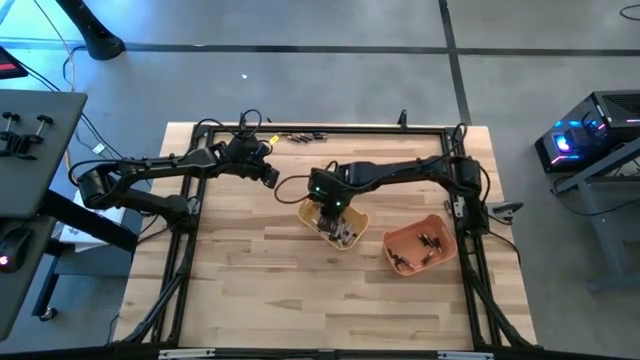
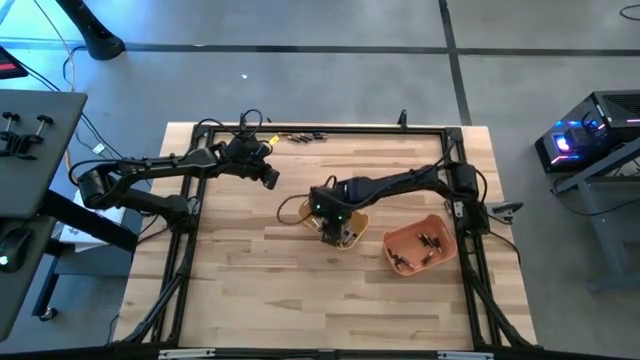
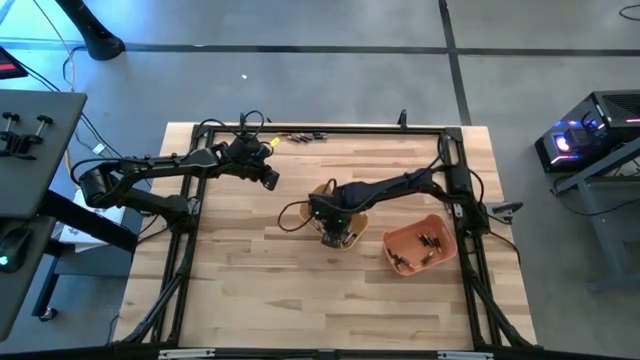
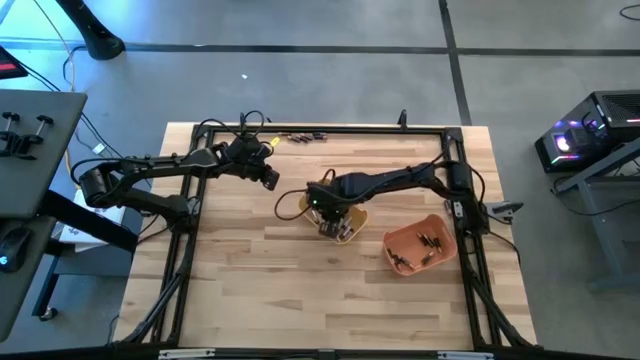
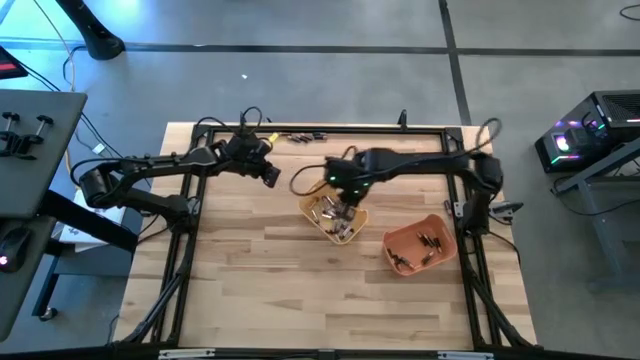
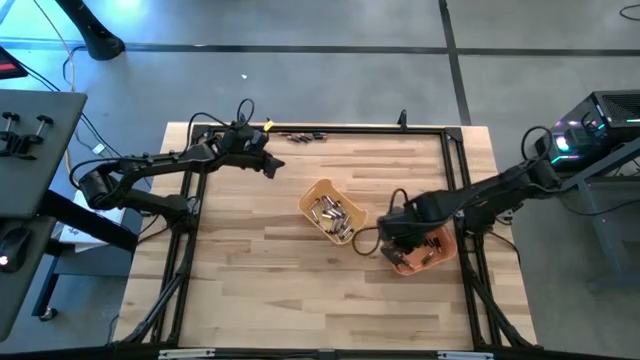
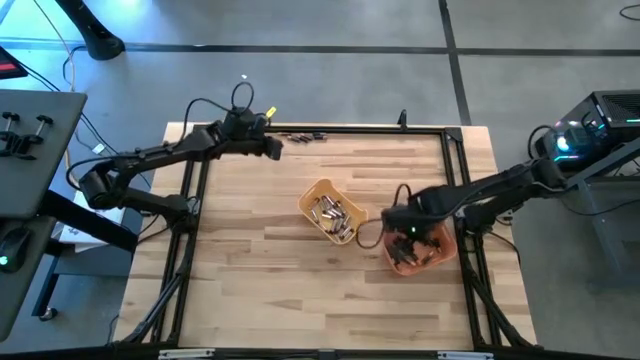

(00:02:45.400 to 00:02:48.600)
Task: Sort batteries
Move the black battery at the yellow bin to the orange bin

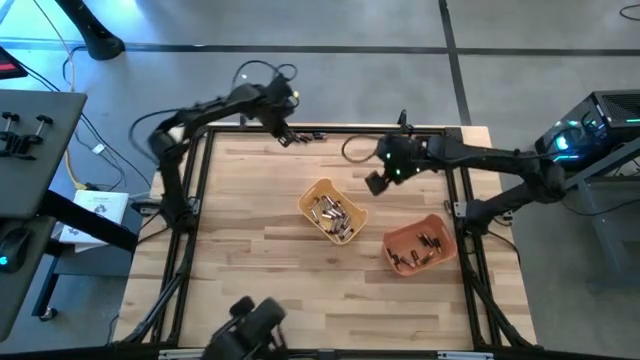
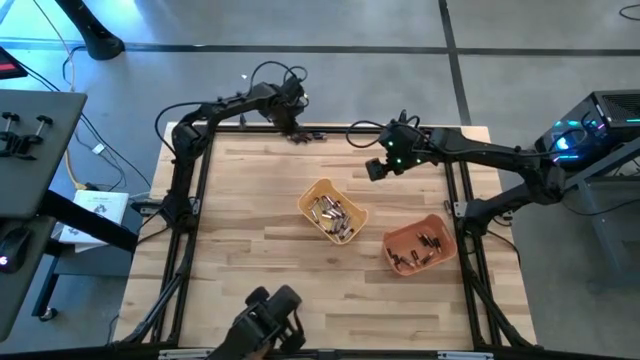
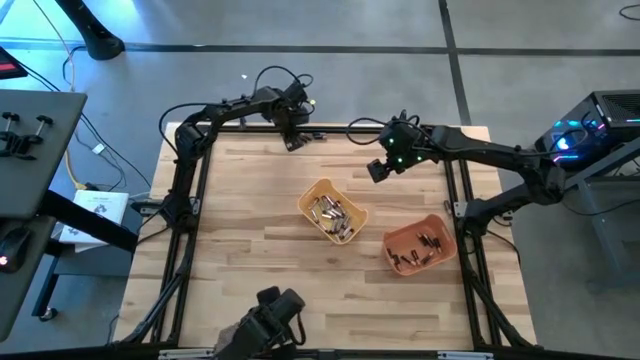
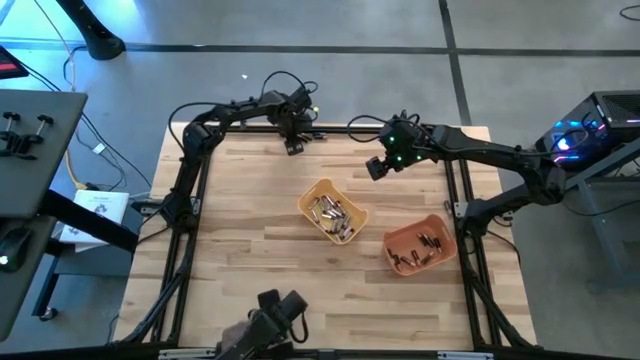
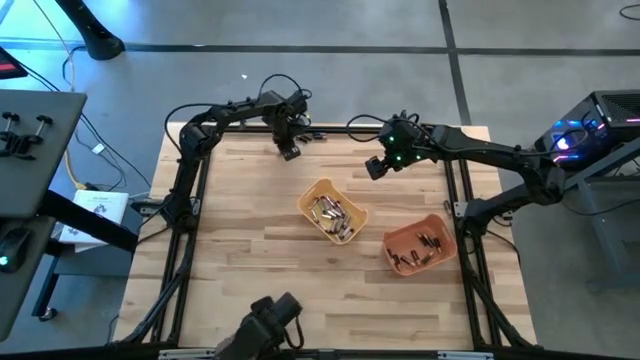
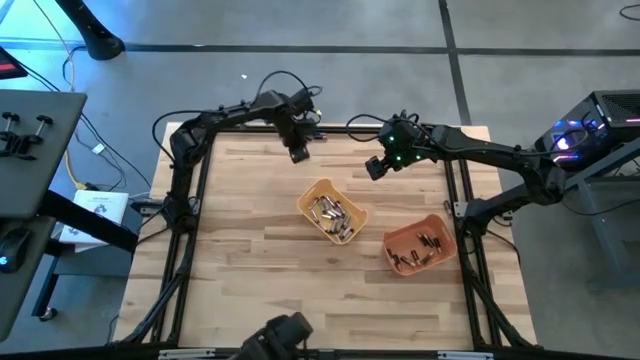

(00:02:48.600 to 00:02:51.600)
Put the black battery into the orange bin

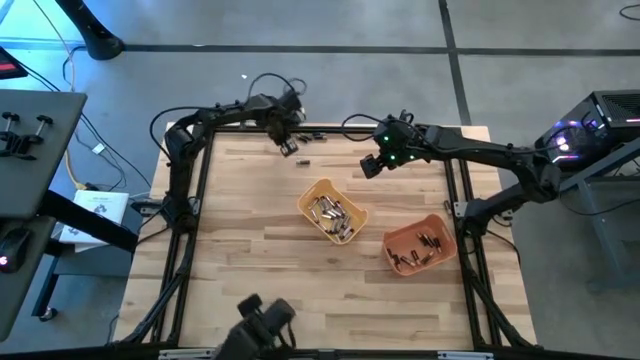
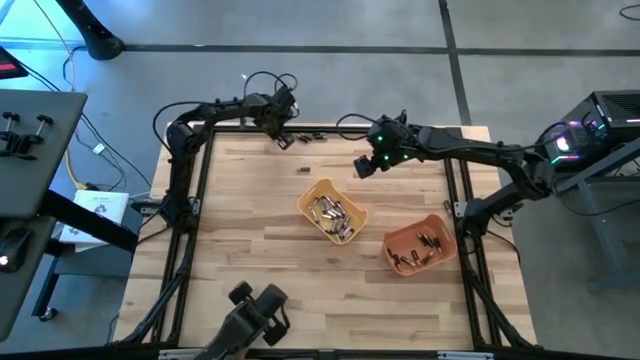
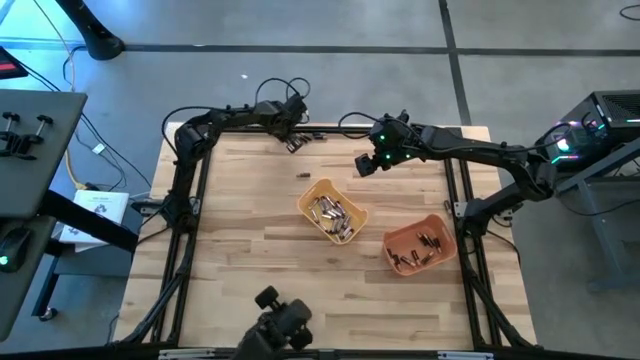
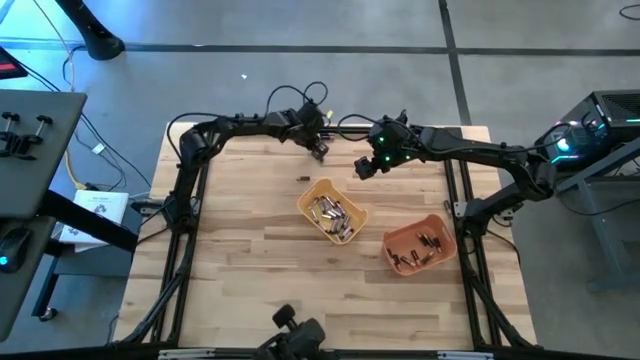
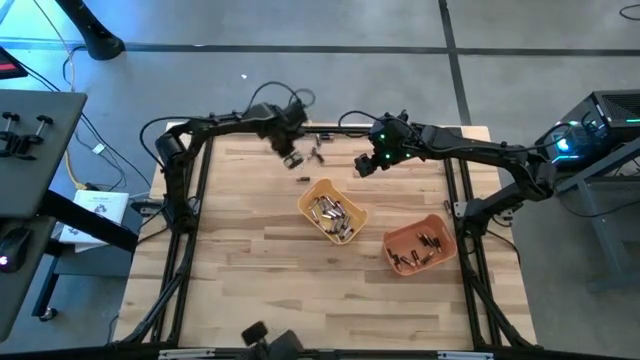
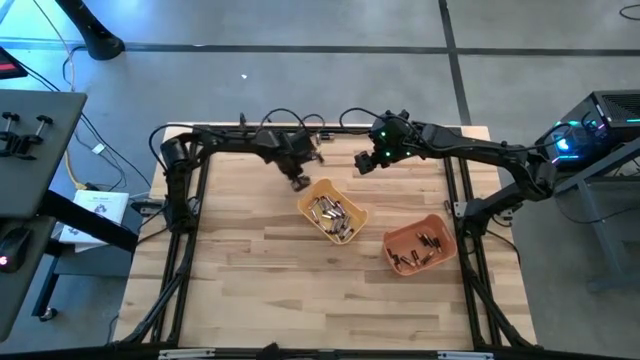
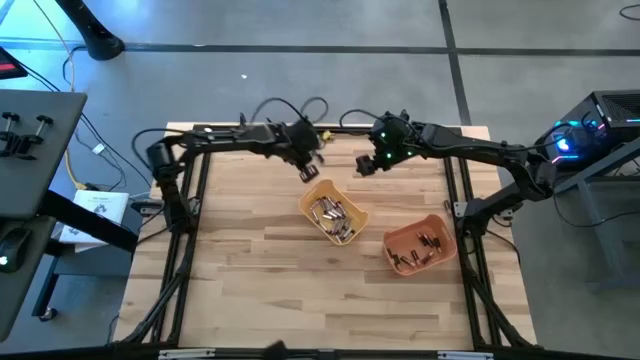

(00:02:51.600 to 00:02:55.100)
Adjust the black batteries

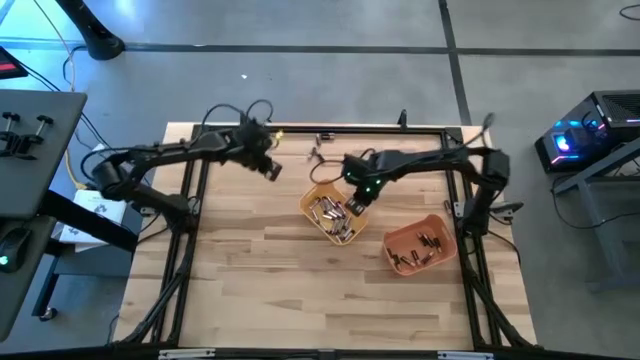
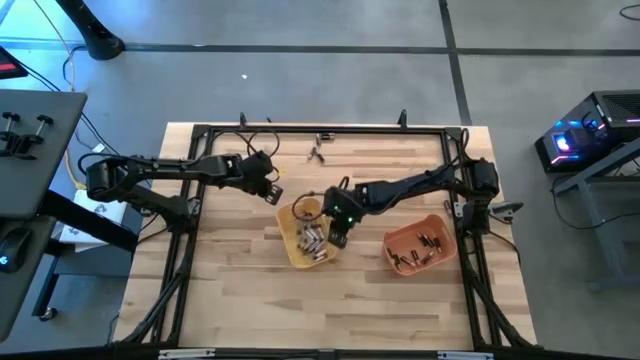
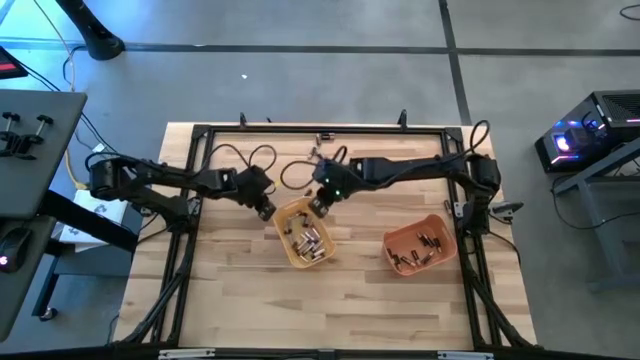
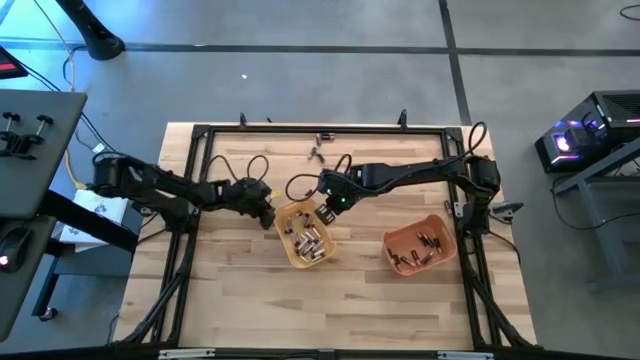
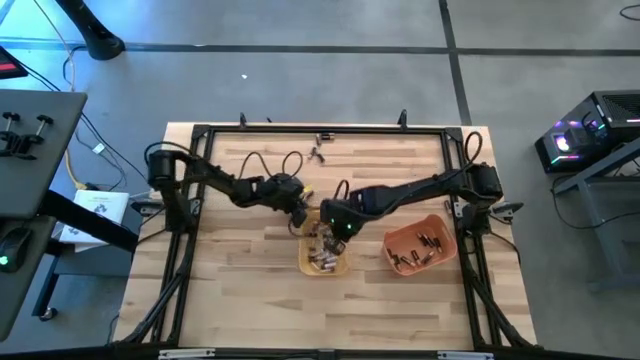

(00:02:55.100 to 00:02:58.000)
Adjust the yellow bin

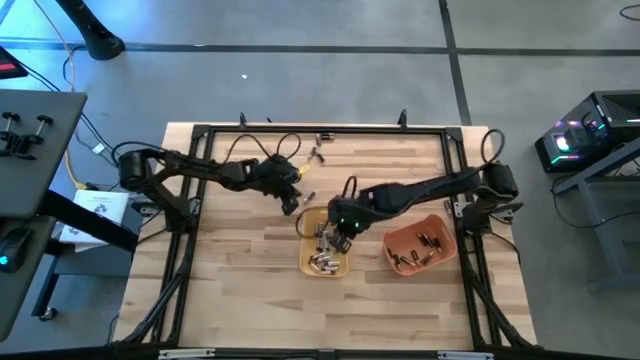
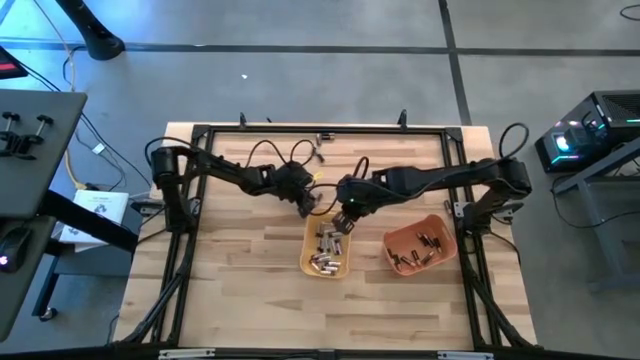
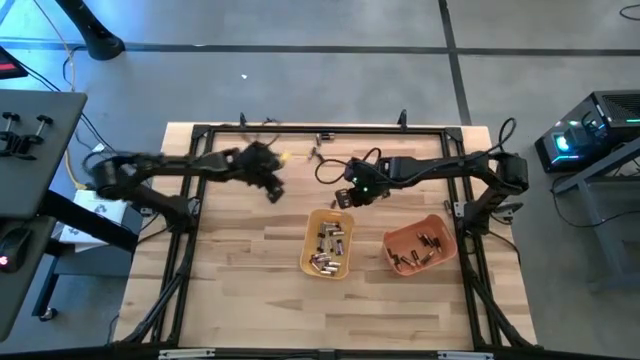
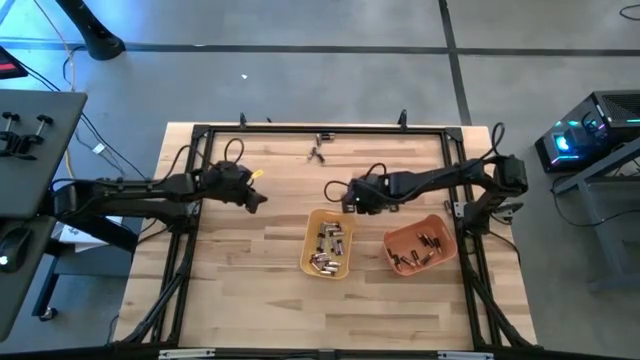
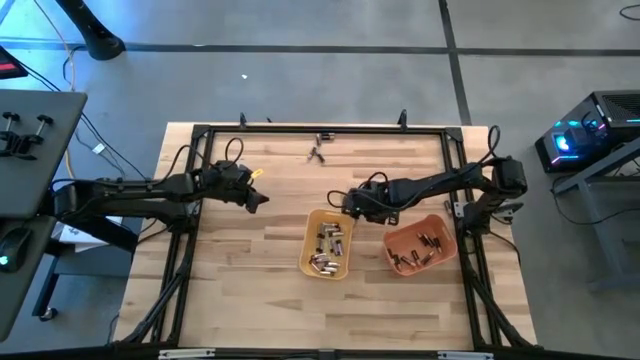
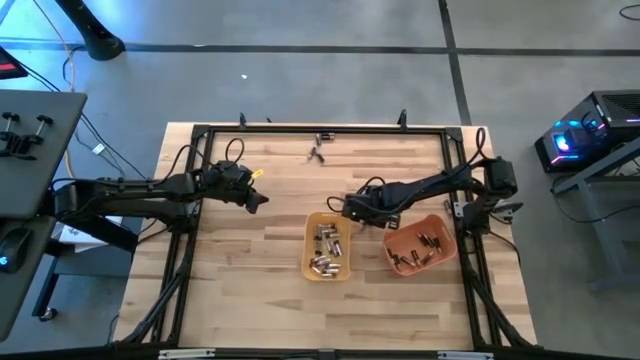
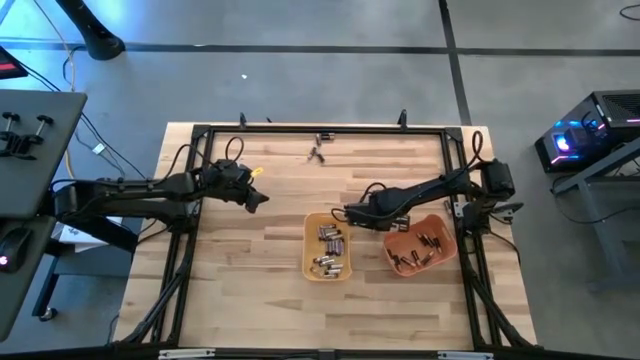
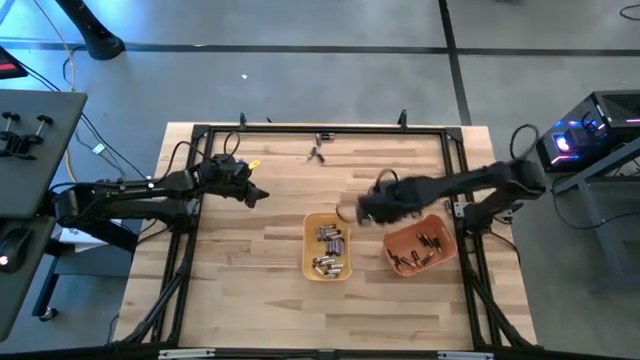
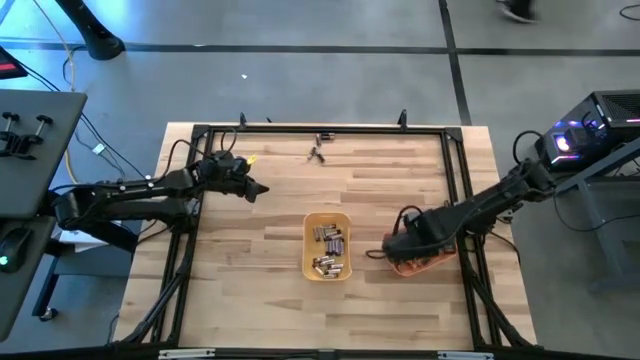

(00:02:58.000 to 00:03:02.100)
Put the black battery into the orange bin

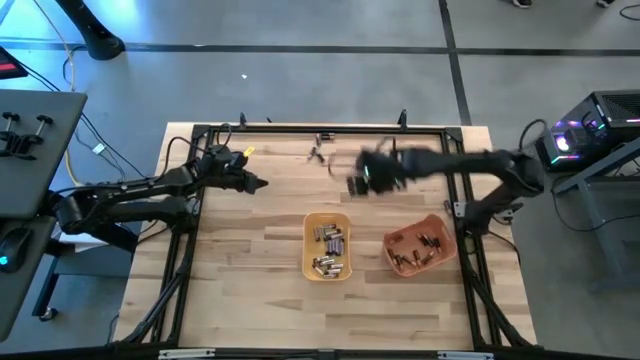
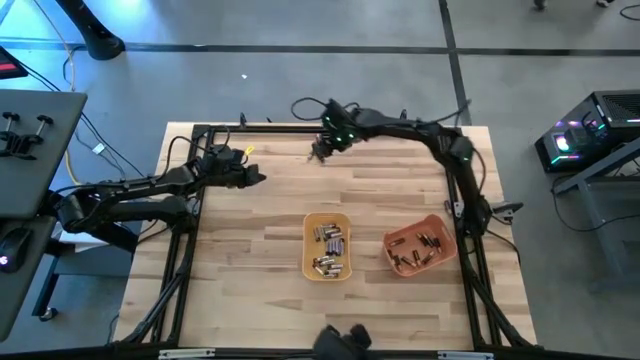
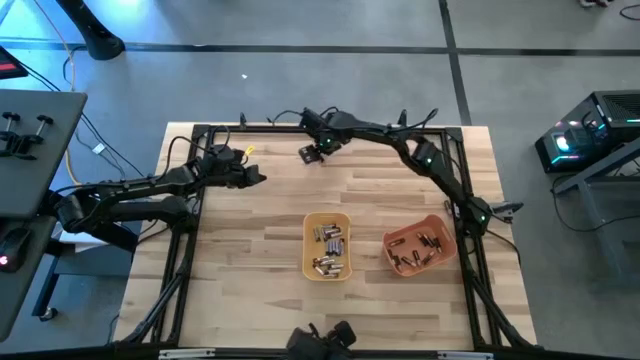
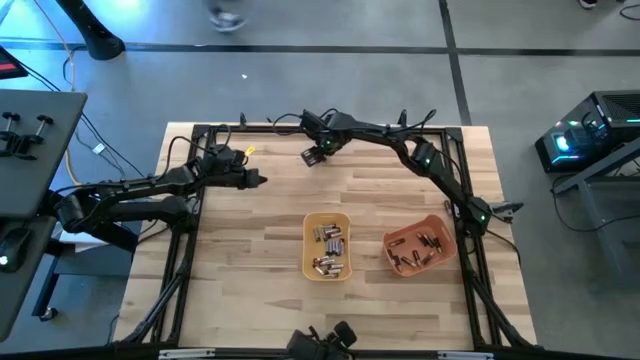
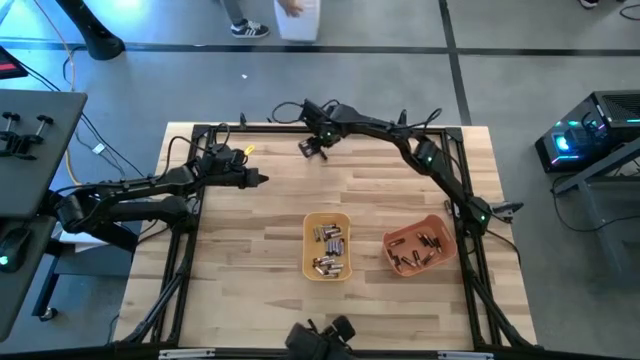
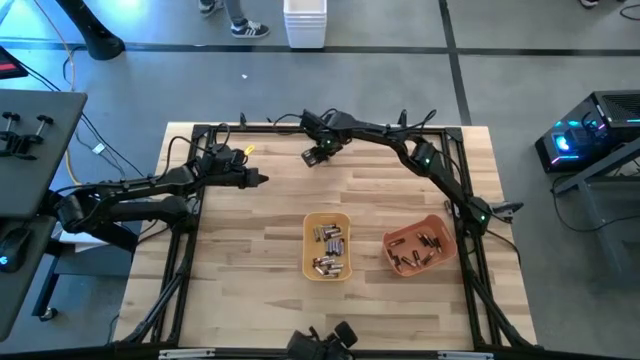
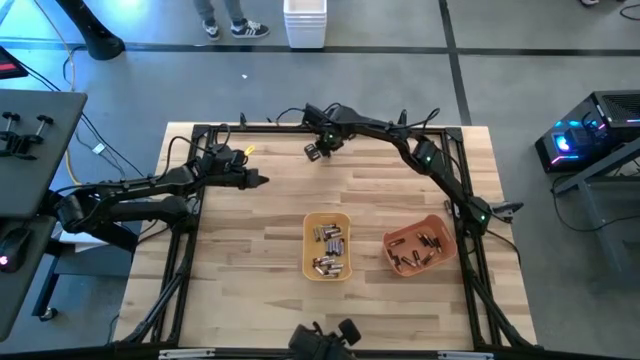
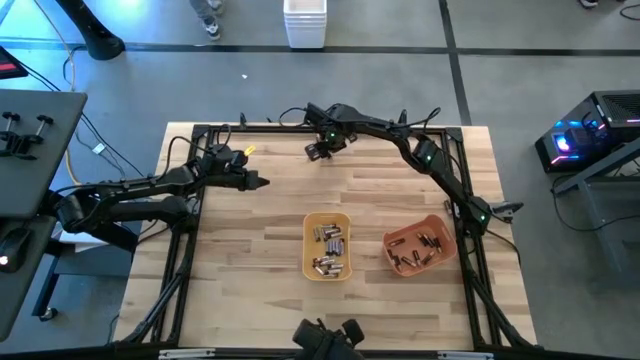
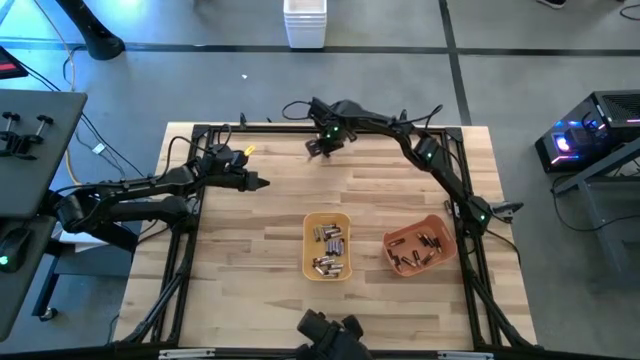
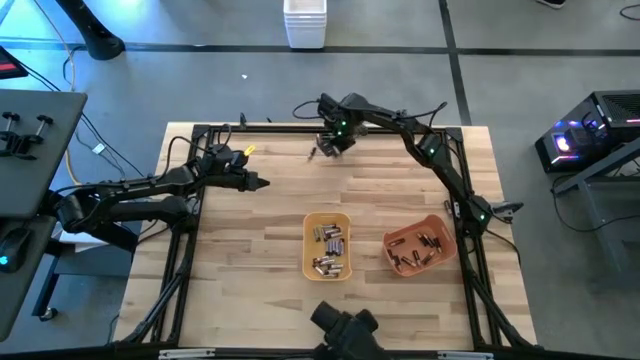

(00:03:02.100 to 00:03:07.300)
Put the black battery into the orange bin
